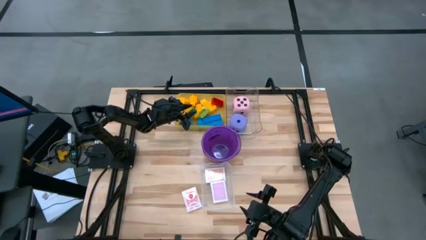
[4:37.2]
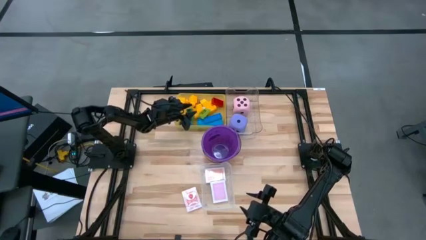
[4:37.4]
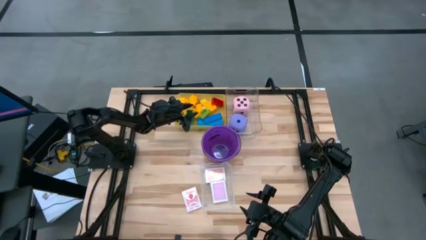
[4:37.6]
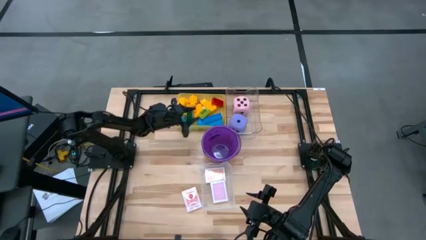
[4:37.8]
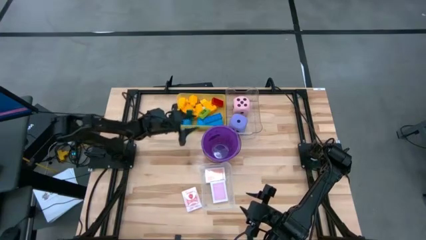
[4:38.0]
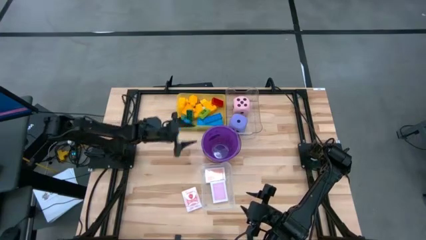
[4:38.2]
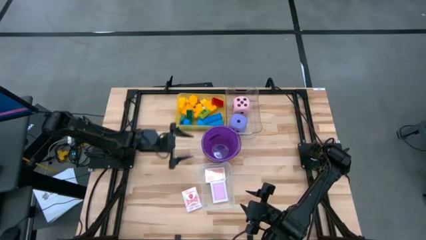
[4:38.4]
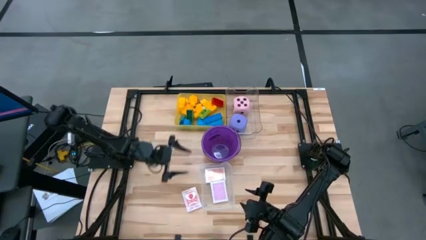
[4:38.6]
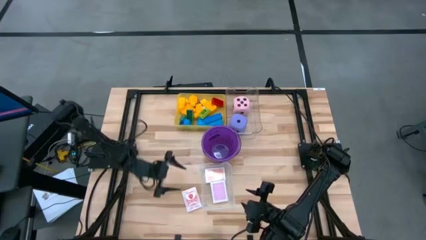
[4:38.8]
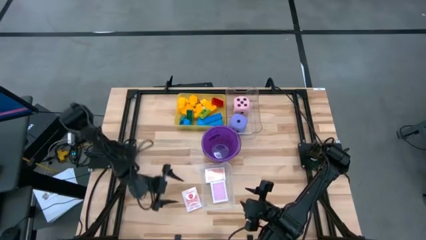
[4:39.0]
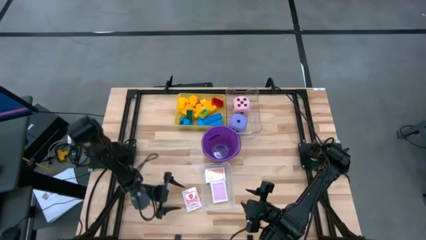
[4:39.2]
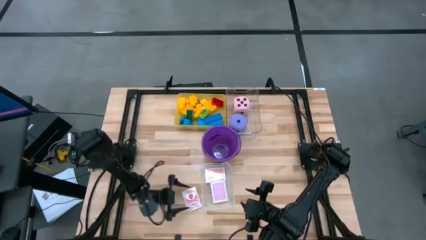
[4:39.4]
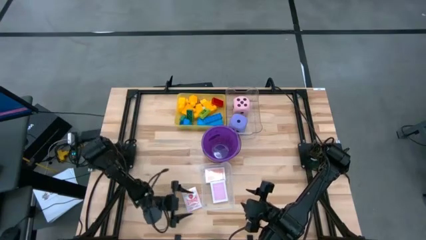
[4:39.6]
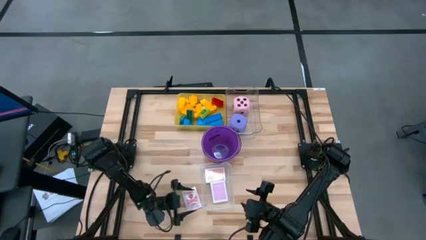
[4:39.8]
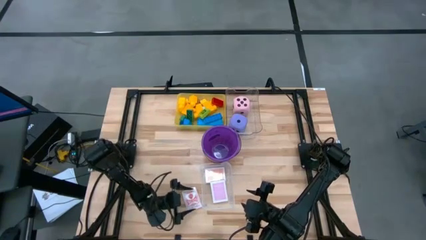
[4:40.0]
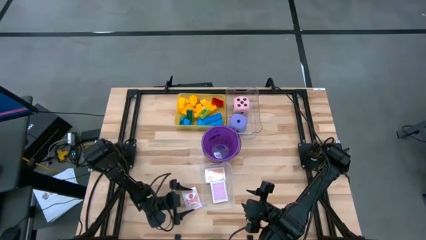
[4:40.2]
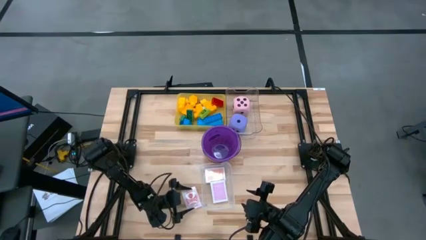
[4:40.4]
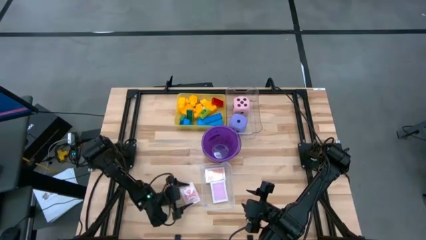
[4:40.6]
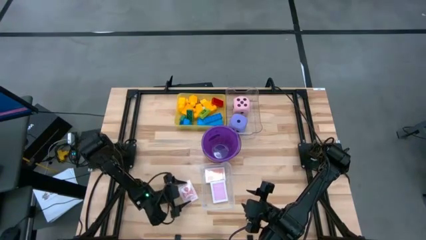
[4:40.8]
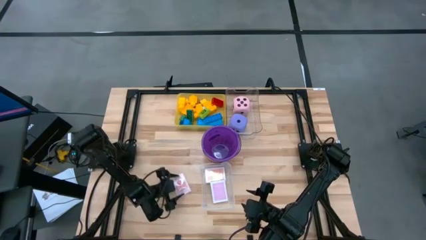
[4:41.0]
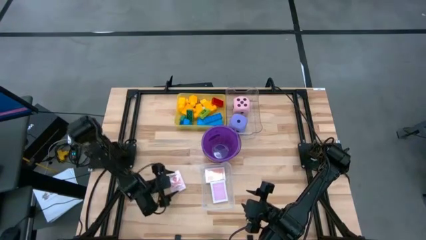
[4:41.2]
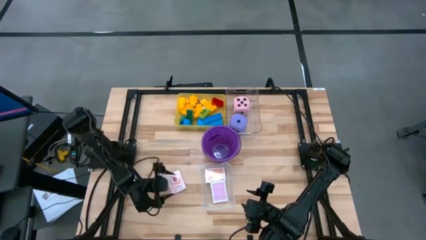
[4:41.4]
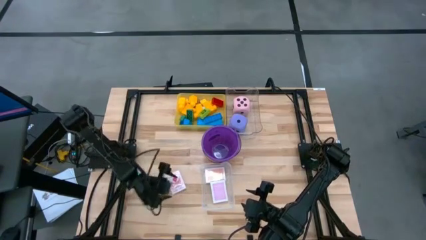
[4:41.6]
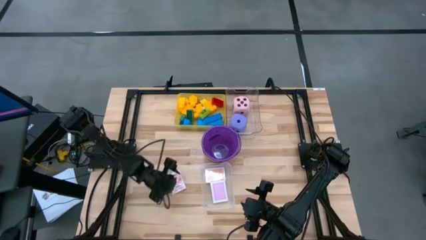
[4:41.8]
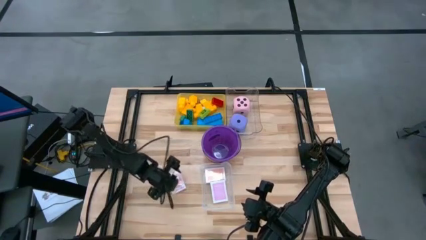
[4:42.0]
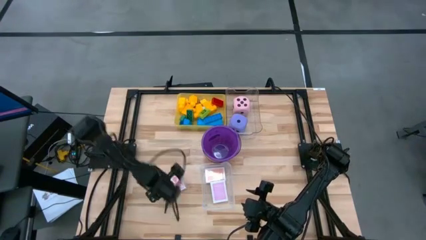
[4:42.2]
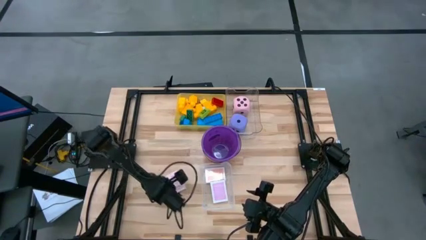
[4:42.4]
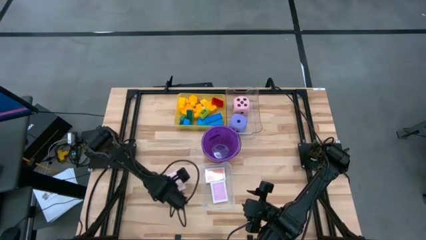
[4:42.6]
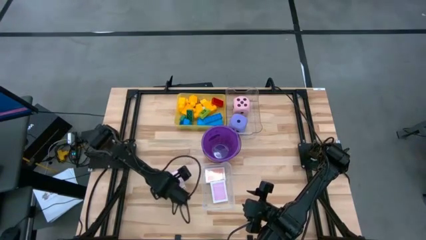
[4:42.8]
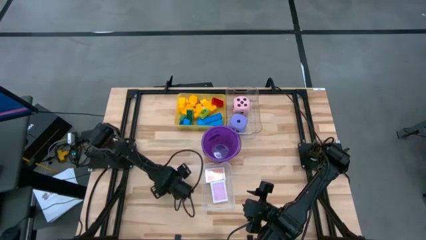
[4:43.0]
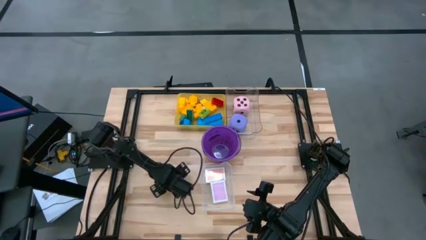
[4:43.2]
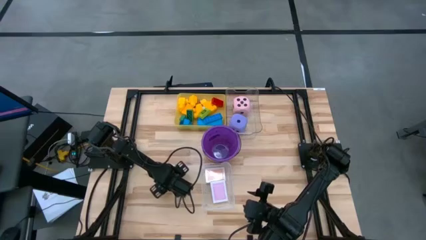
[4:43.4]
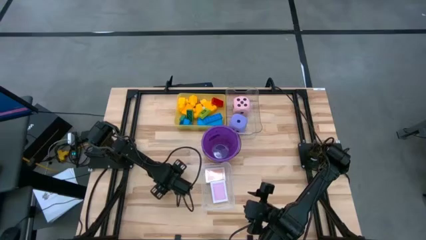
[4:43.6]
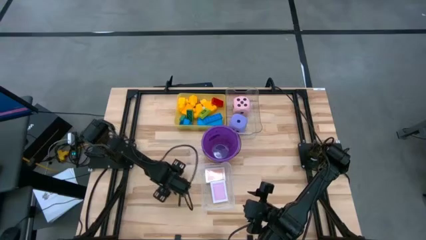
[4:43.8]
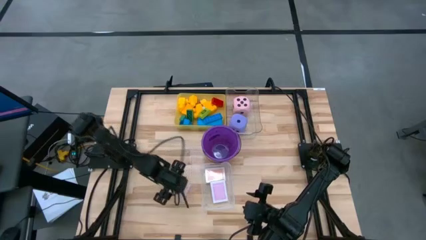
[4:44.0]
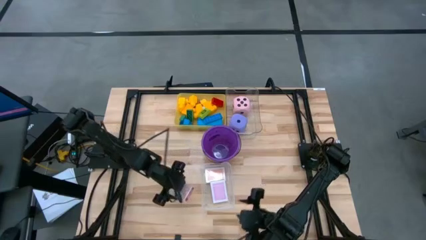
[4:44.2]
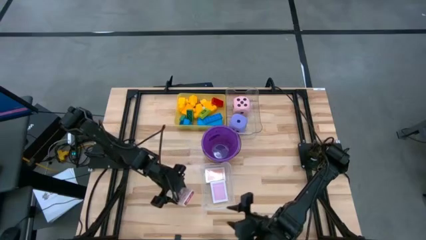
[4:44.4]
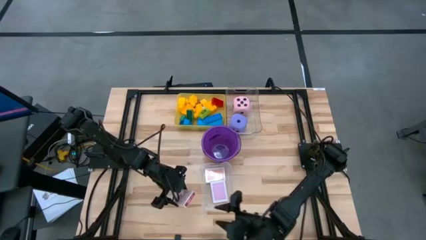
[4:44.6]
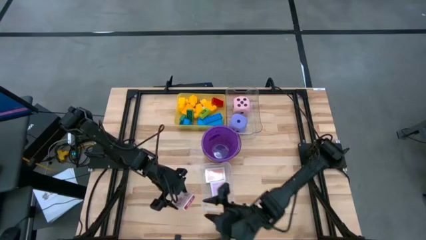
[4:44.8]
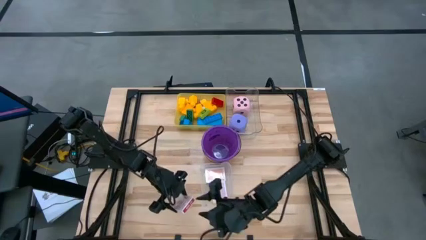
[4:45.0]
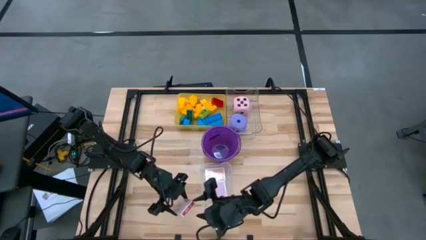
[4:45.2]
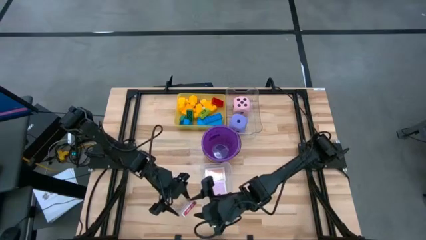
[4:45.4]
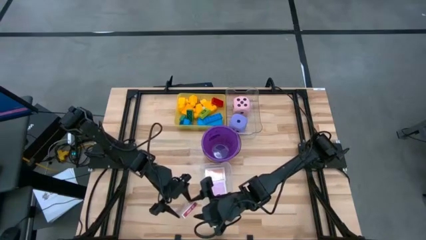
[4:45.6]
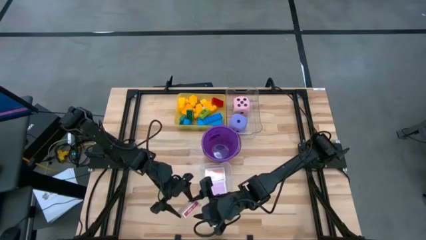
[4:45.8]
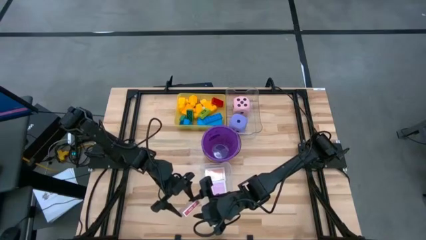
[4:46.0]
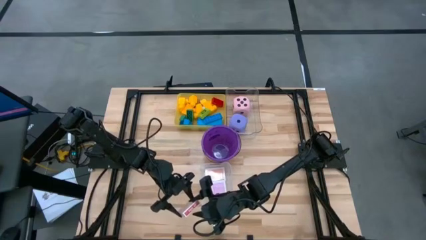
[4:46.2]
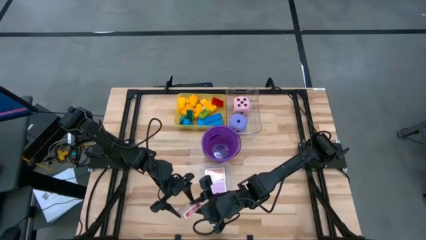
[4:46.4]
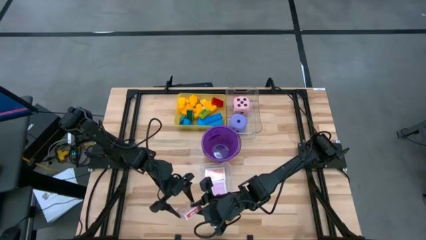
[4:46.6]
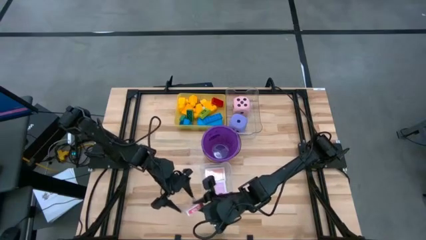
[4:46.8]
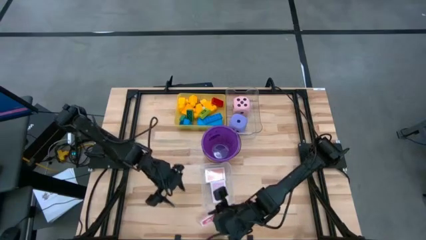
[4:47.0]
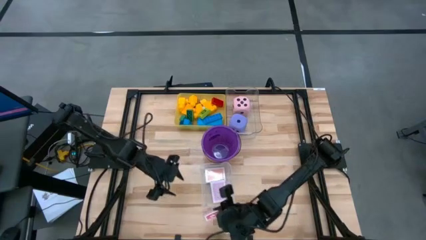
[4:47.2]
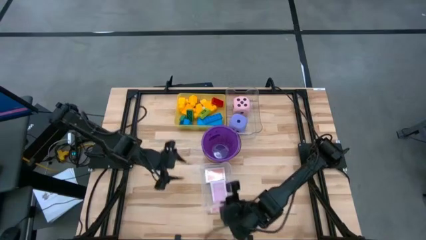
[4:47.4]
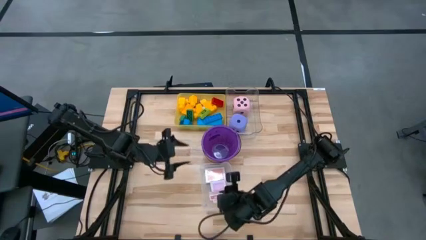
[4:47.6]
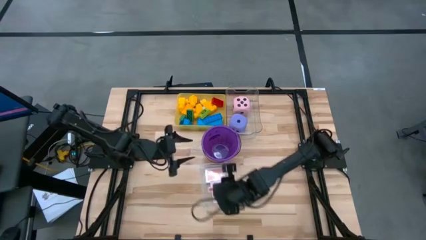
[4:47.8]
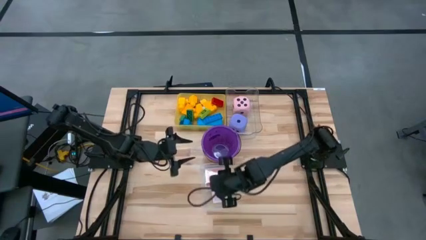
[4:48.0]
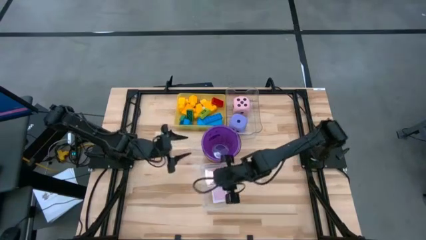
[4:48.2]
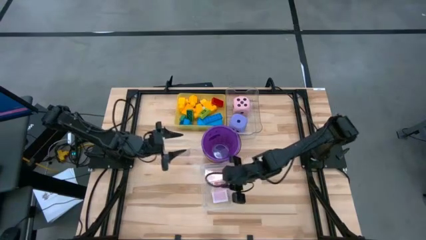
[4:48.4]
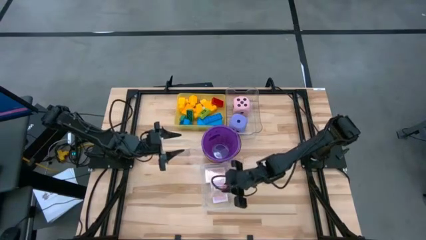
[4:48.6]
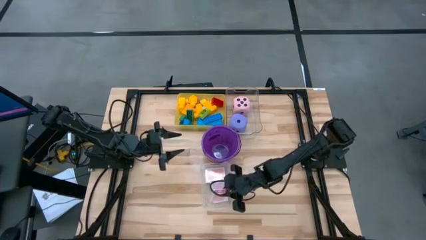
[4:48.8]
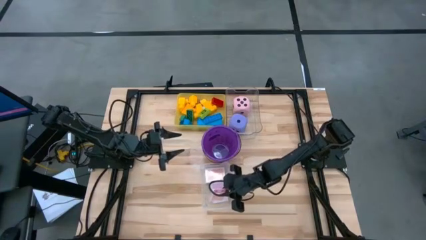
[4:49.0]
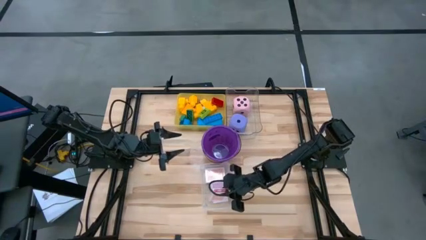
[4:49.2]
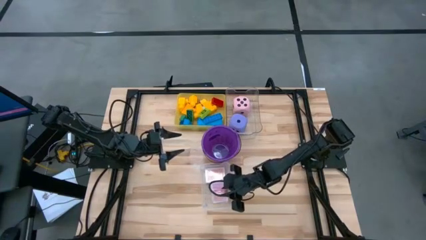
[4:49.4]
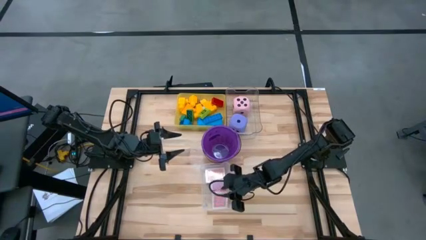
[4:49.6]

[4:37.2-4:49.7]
Task: Pick & Place Toys
Put the red deck of cards into the bottom transparent bin

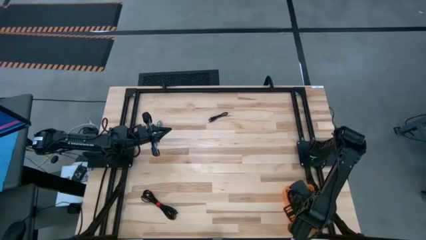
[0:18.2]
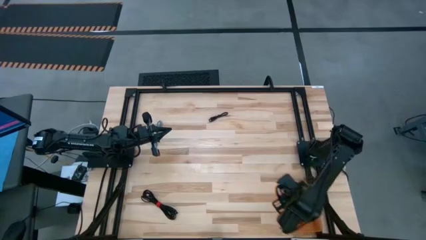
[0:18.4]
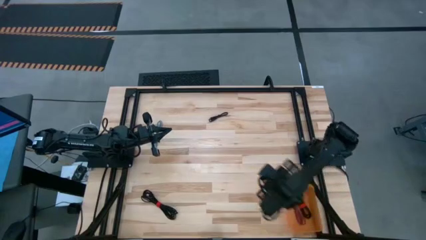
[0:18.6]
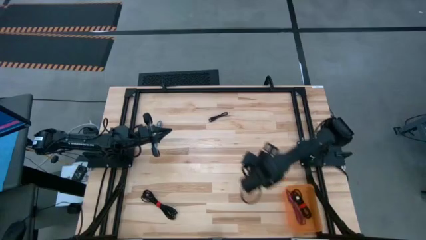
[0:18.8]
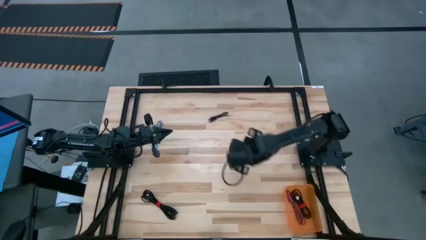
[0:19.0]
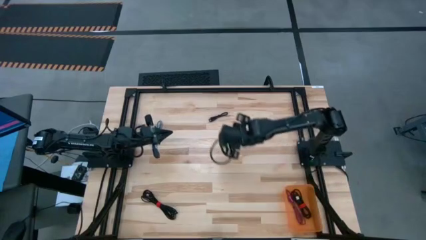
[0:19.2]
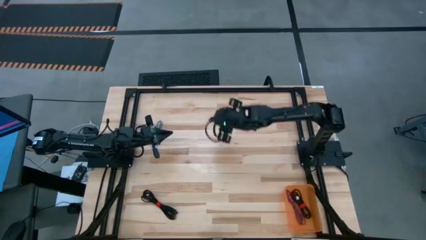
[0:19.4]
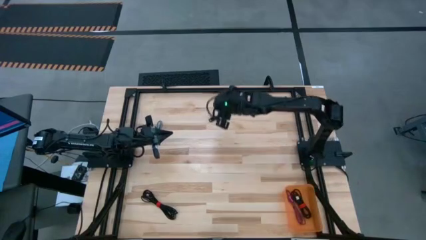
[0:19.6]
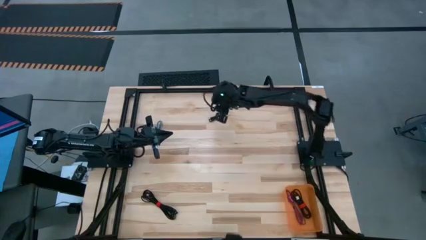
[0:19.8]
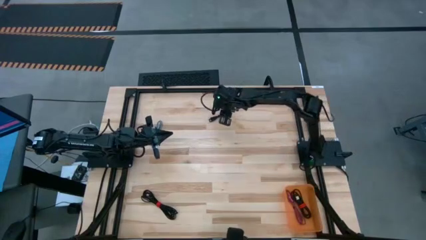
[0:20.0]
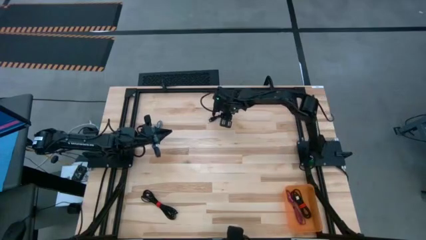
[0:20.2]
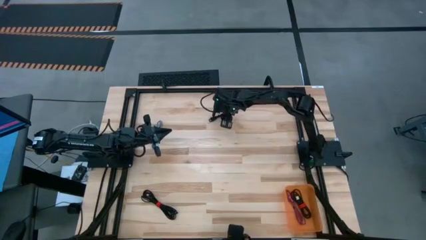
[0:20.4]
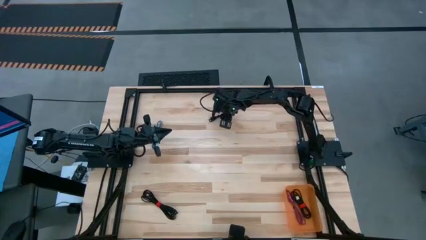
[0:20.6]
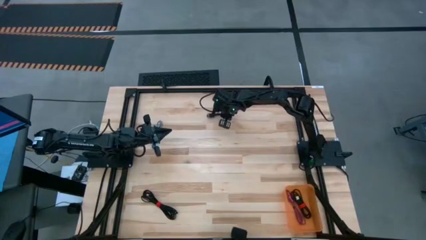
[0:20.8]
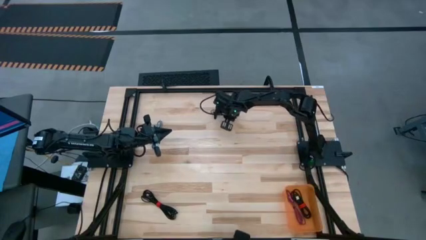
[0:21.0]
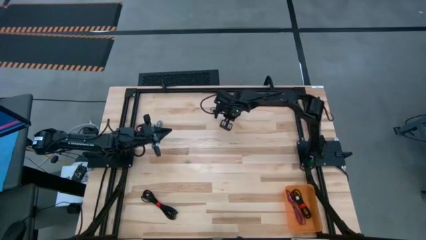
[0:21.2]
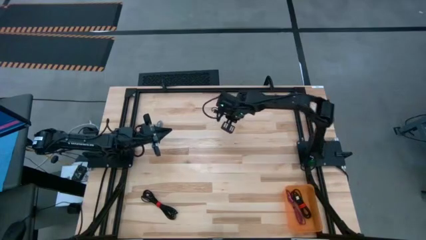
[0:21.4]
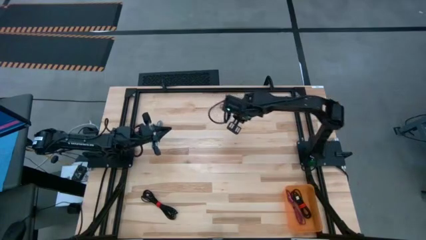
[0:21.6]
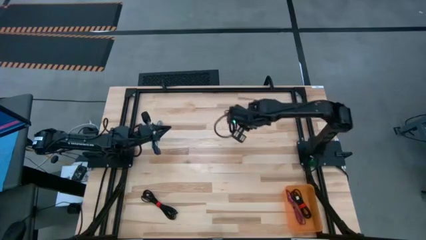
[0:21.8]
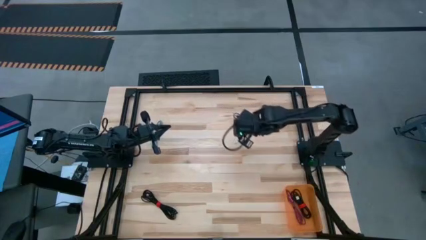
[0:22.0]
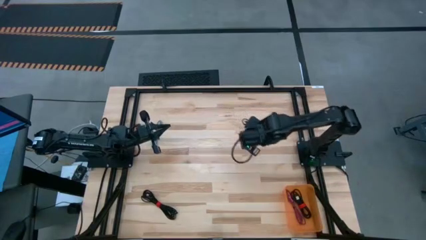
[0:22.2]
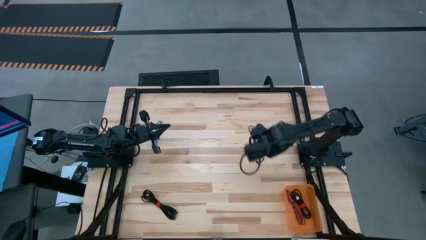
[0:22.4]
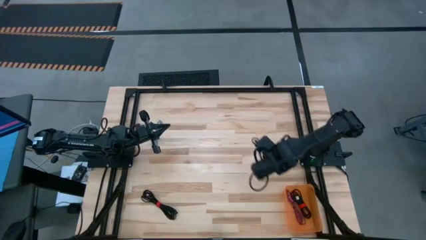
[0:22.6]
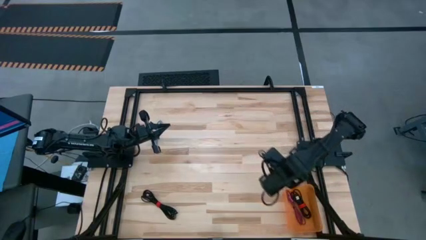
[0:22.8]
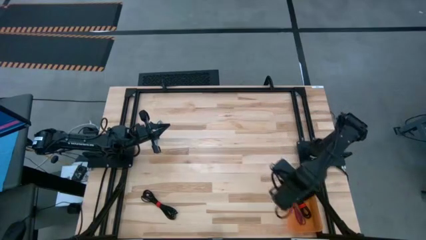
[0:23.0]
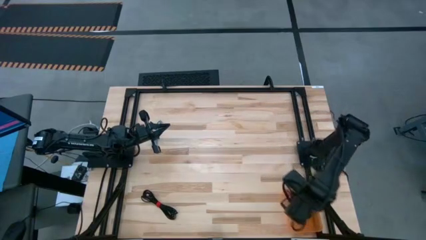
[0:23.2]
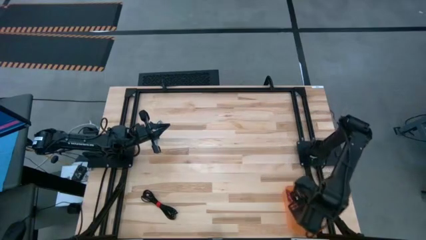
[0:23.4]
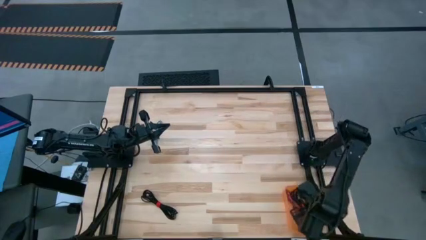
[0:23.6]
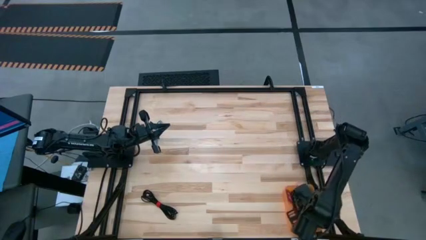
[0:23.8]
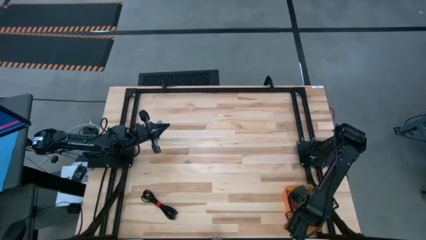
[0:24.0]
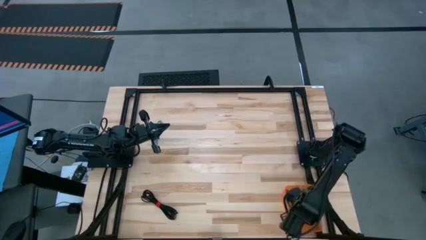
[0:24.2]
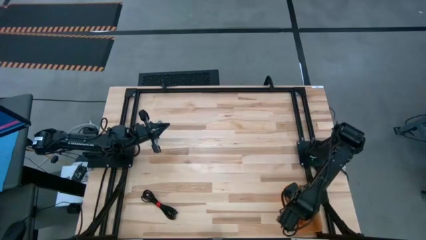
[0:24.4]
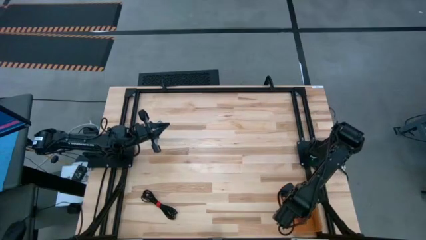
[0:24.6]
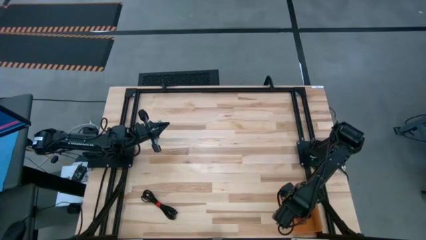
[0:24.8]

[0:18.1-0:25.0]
Task: Pick and place USB-C Cables
Put the top black charger cable into the orange bin
